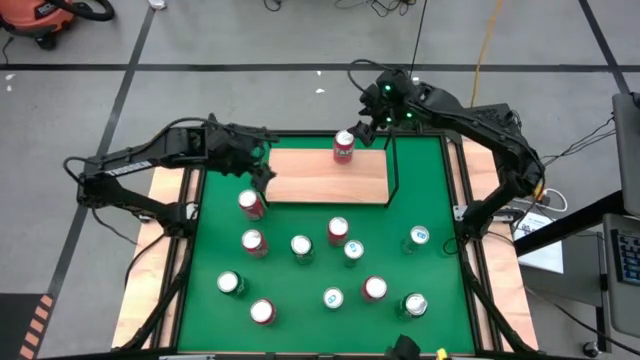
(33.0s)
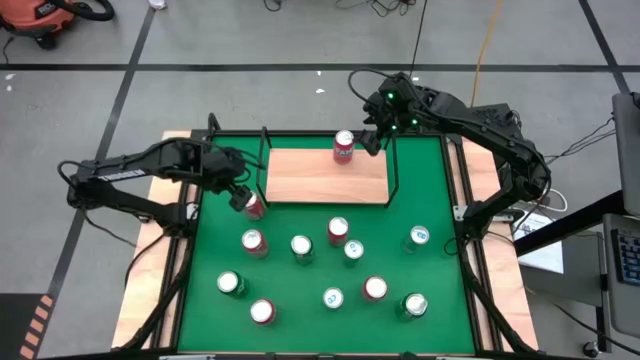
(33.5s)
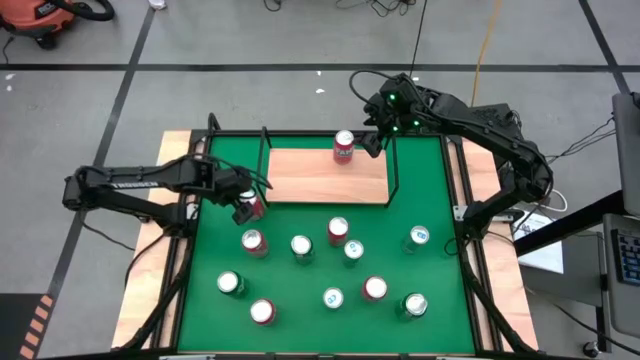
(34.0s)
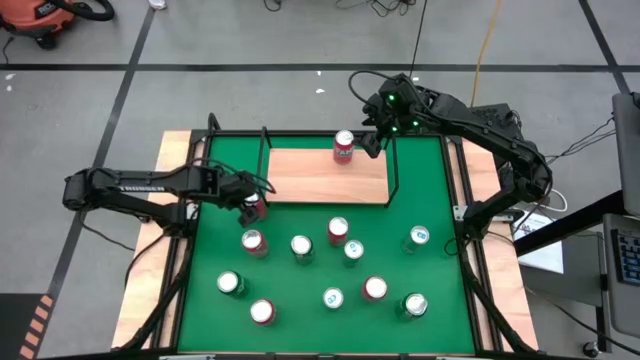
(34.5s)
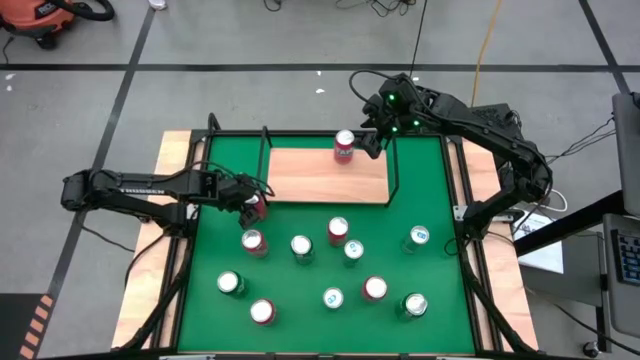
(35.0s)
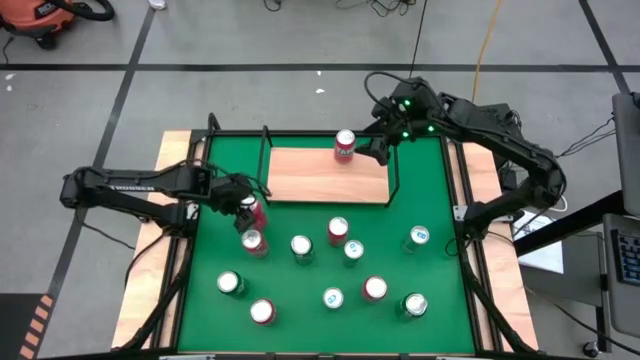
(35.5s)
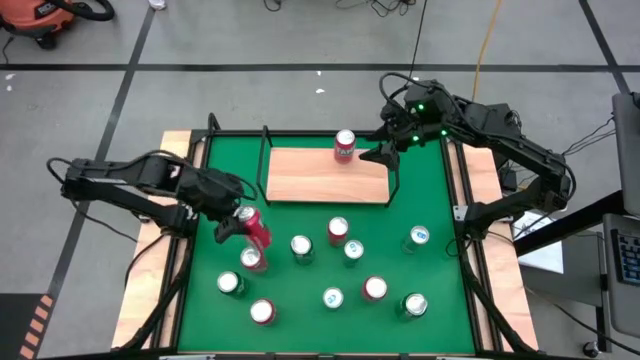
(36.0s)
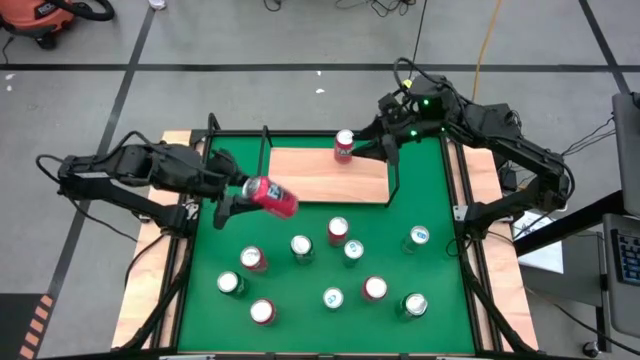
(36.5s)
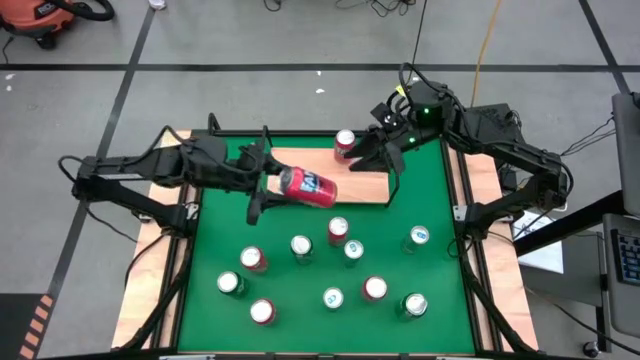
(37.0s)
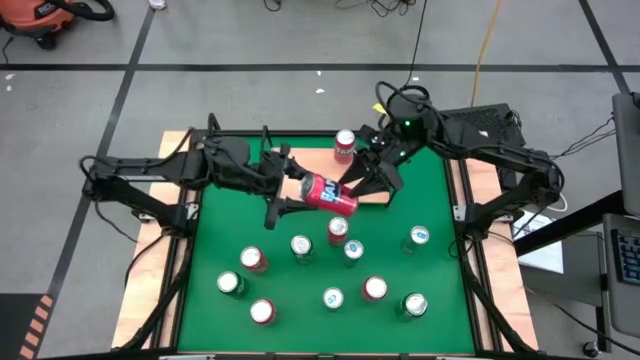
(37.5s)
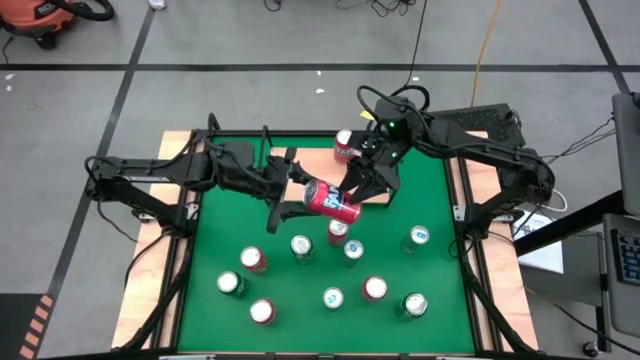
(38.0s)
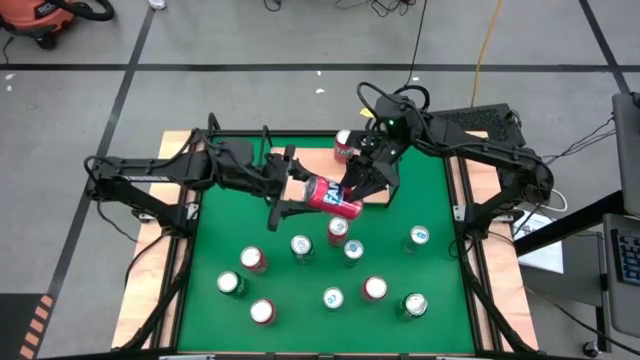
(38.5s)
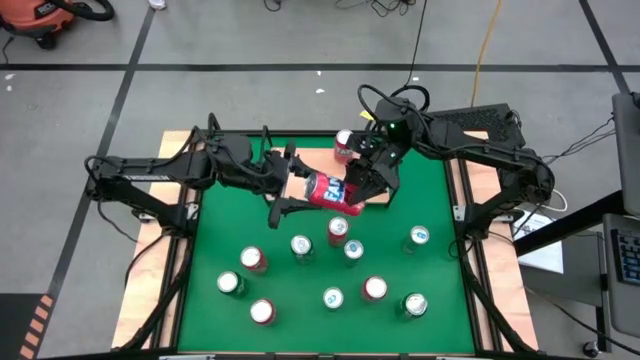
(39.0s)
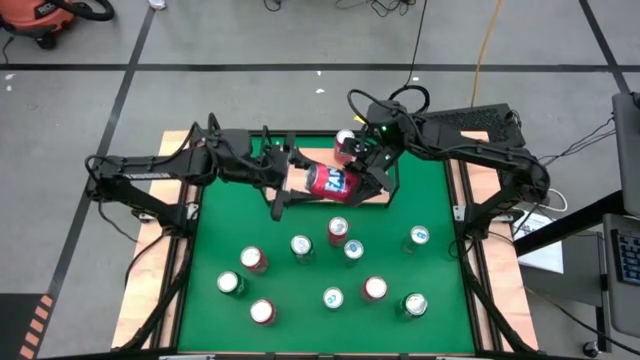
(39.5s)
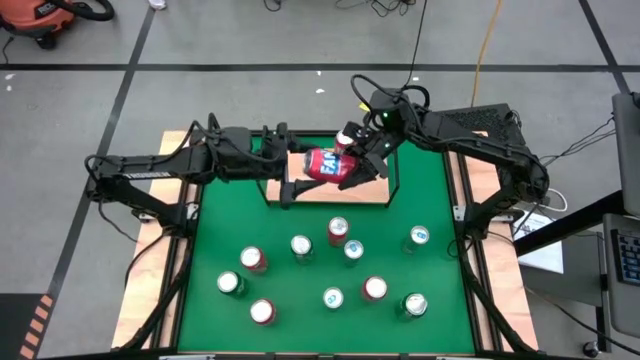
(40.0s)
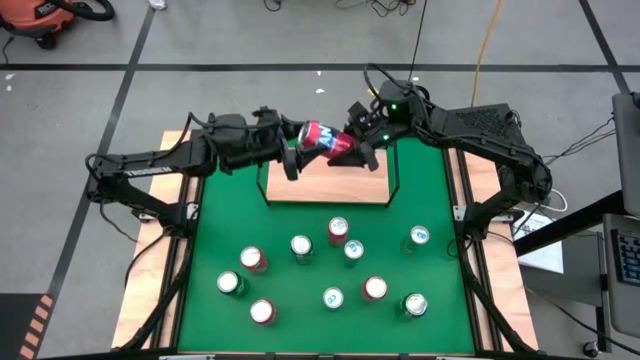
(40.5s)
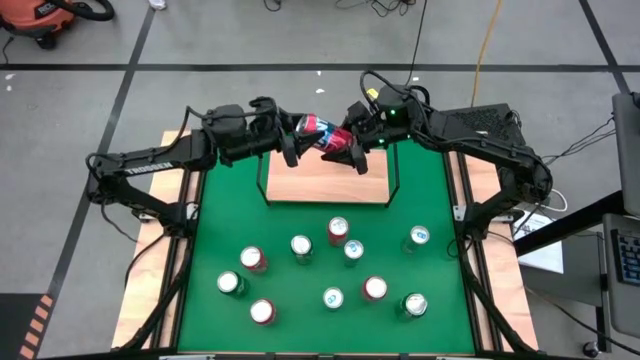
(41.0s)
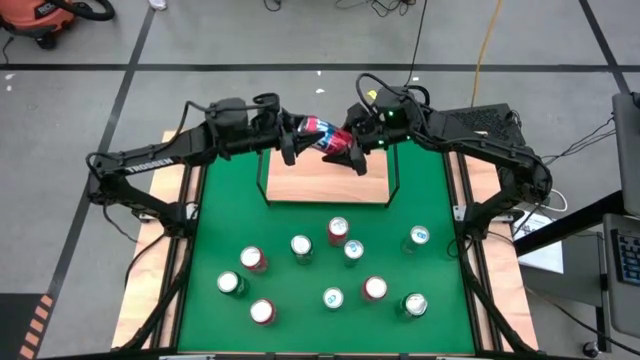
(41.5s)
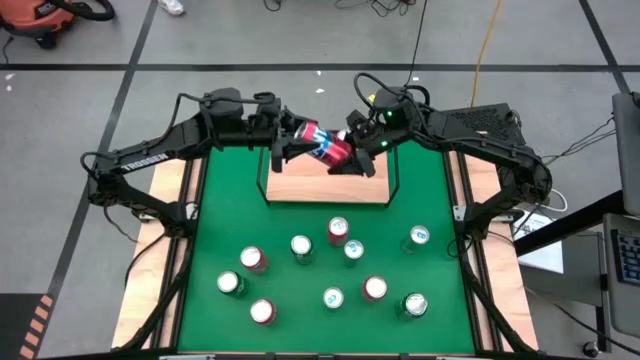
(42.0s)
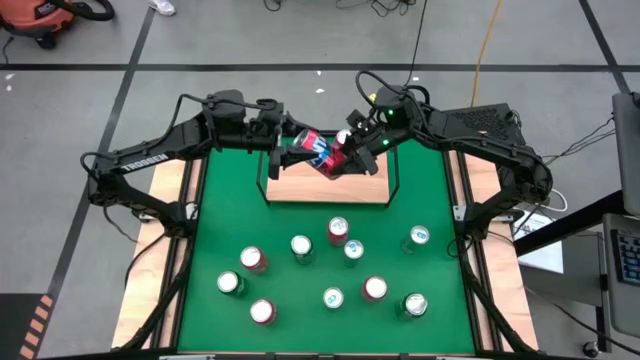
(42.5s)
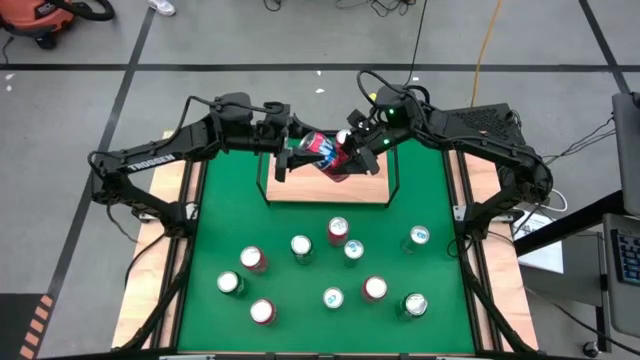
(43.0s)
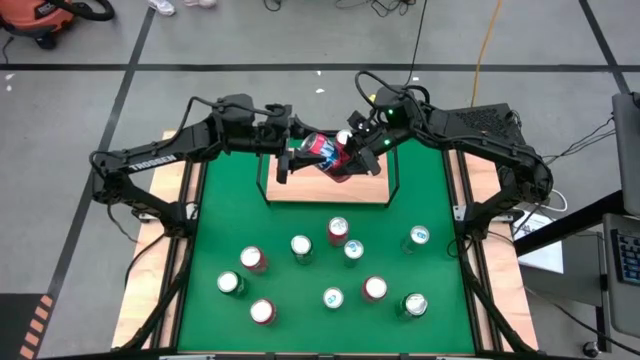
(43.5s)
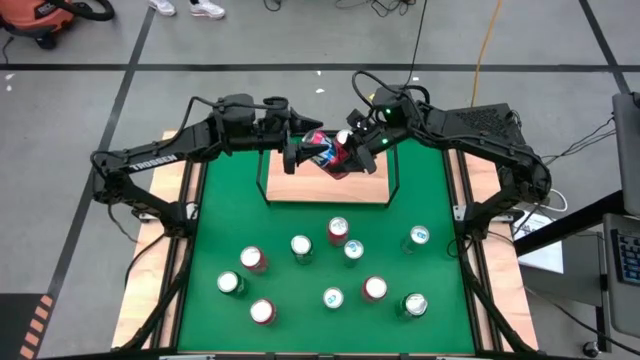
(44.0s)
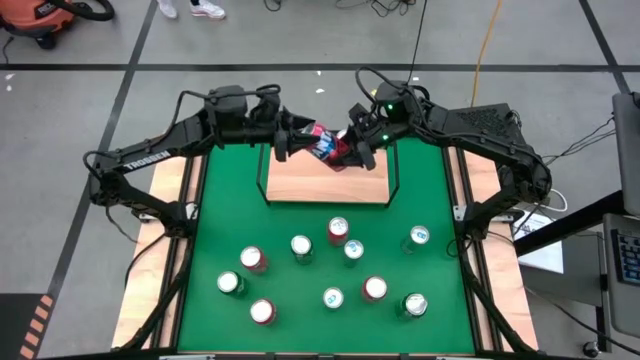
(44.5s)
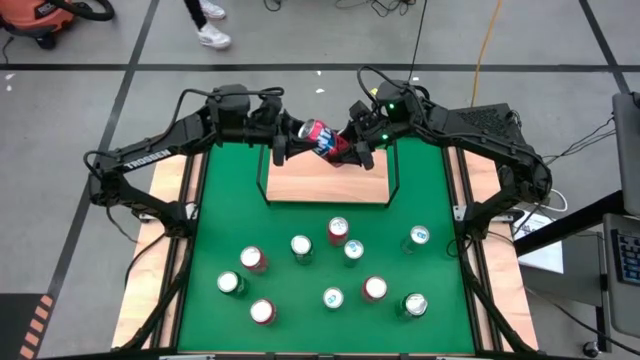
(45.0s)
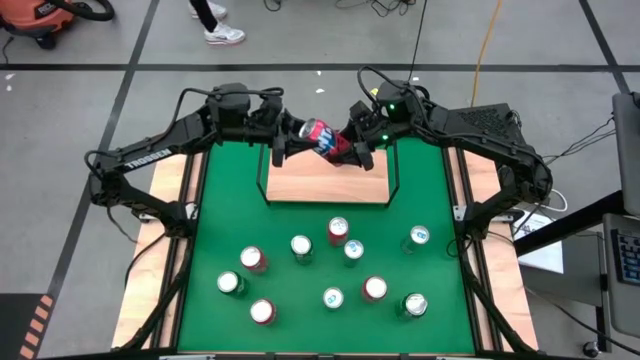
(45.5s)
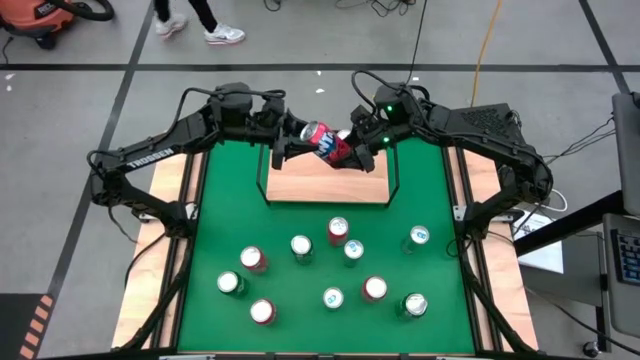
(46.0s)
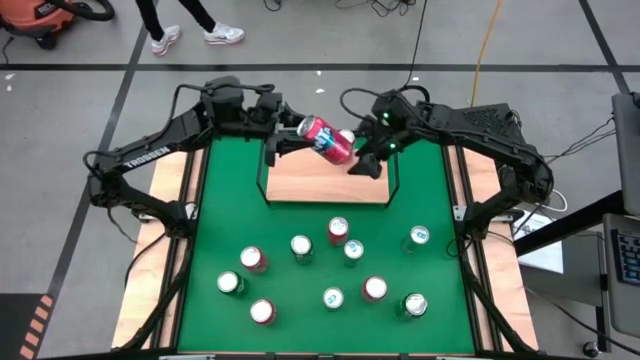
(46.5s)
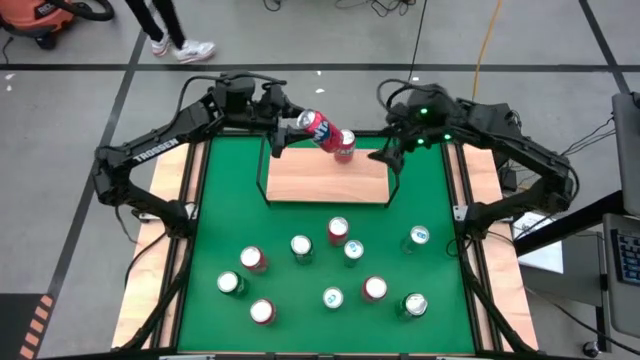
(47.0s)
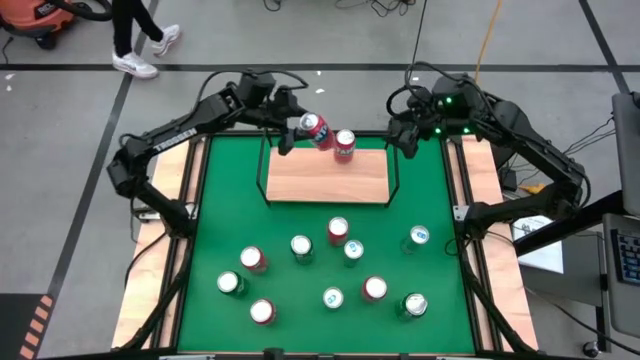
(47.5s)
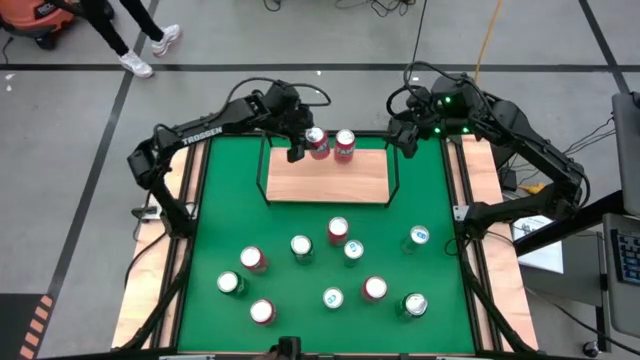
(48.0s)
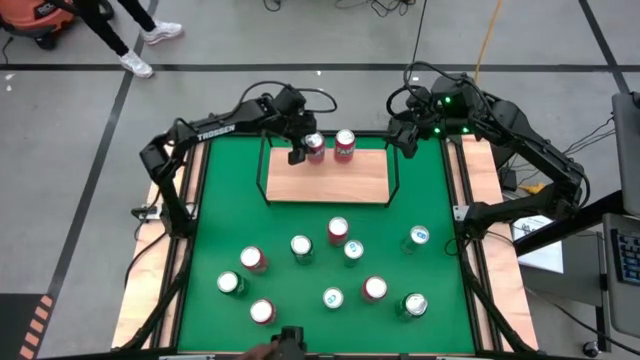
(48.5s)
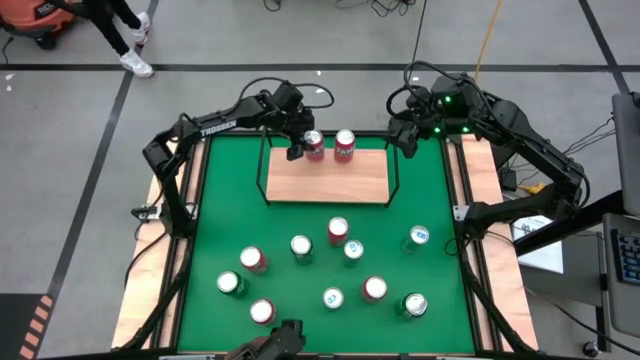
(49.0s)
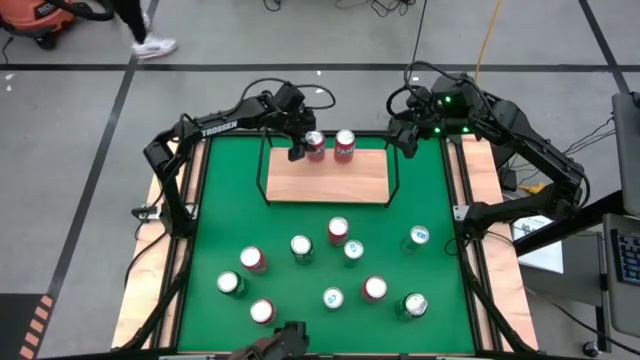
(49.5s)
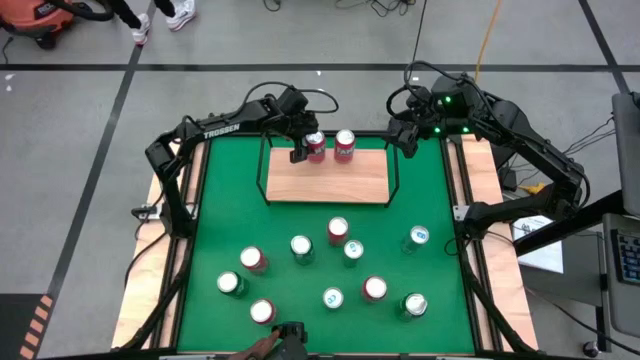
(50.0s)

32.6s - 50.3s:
Task: Place canned beverage on shelf
Put the red soda can on the shelf

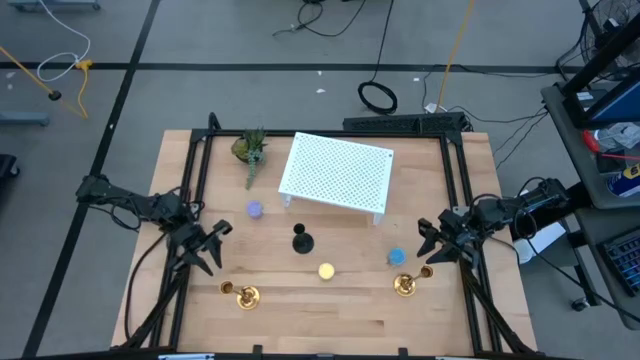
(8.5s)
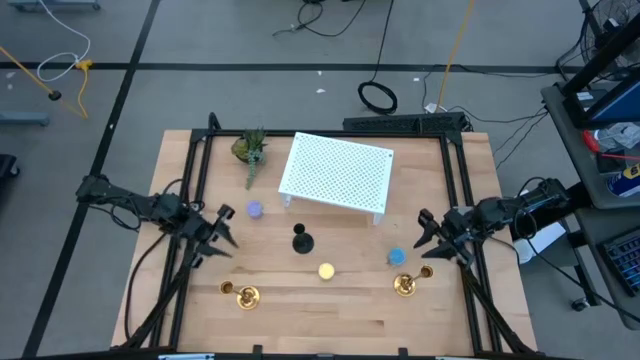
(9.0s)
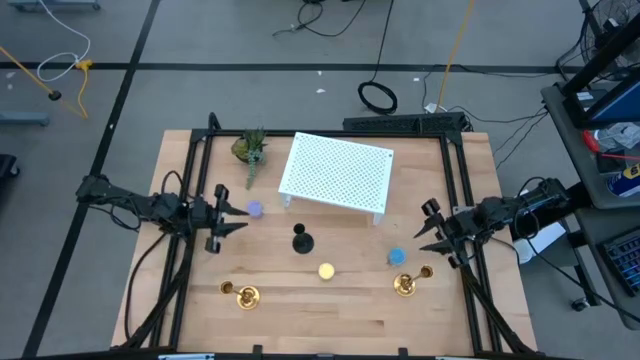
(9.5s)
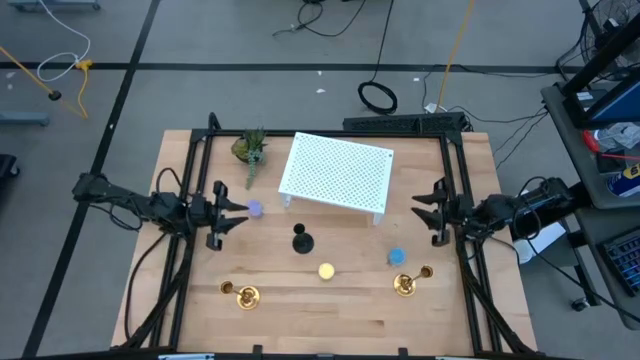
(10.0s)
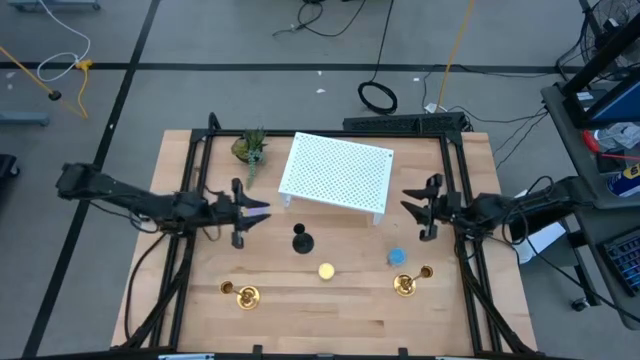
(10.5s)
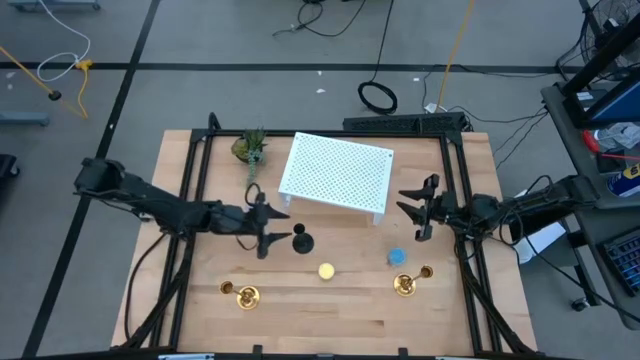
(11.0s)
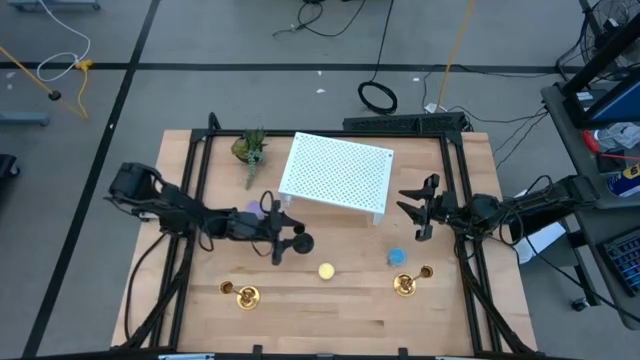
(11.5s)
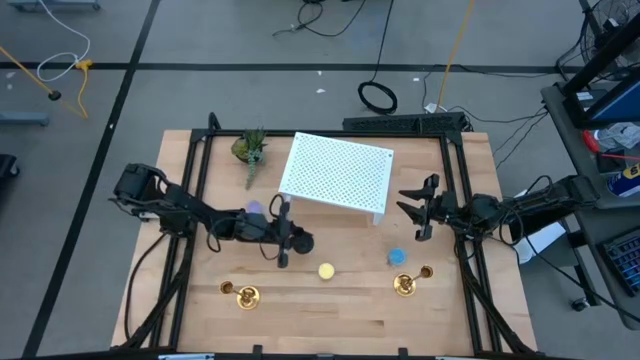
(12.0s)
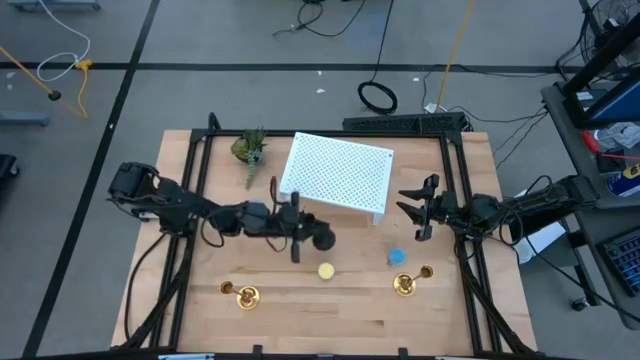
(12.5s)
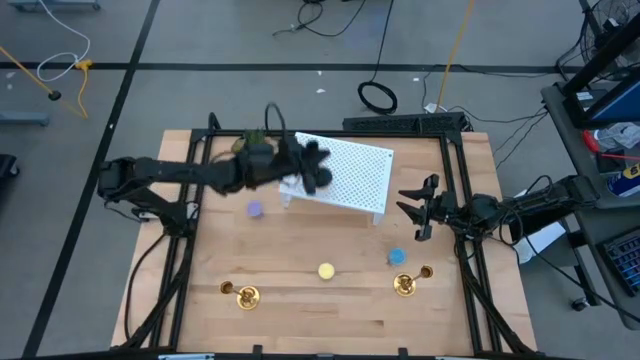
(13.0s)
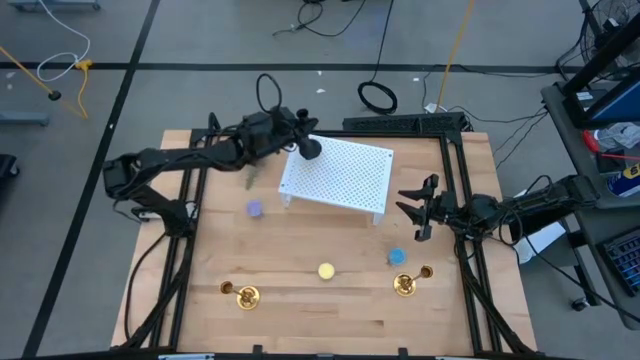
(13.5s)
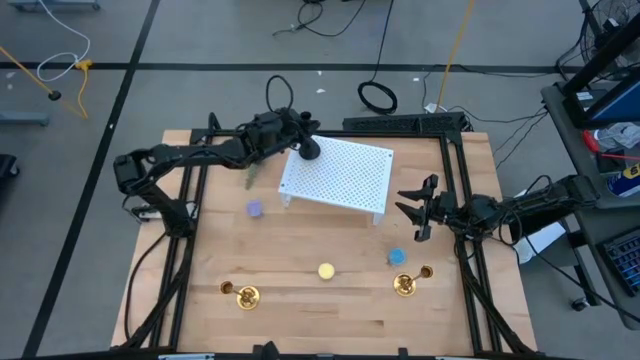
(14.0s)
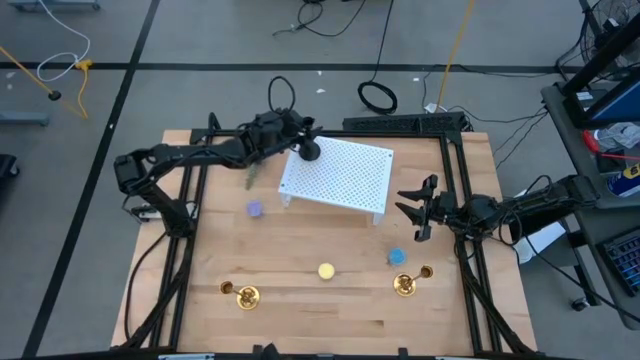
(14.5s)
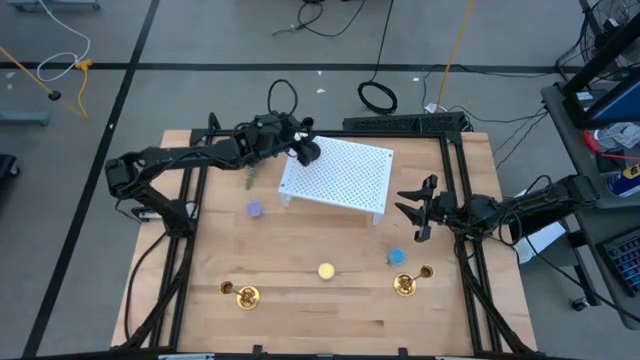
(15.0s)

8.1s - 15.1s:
Task: Pick & Place candle stick holders
Put the black candle holder on the shelf
